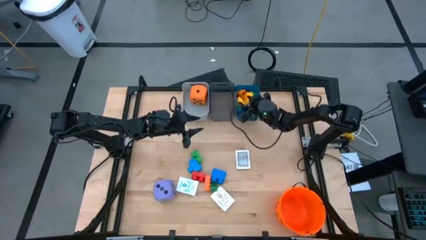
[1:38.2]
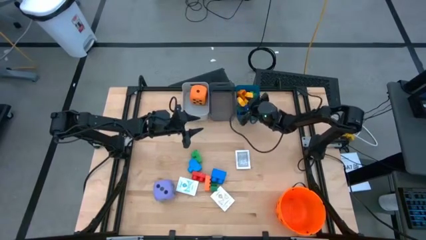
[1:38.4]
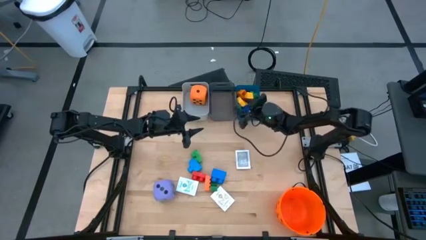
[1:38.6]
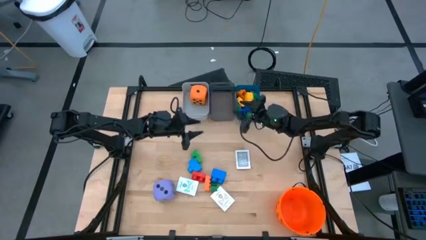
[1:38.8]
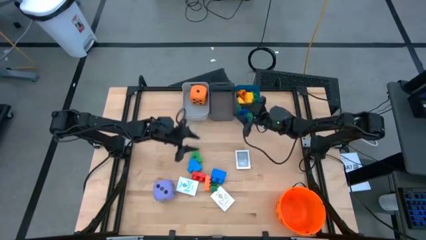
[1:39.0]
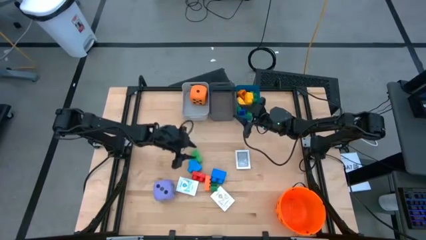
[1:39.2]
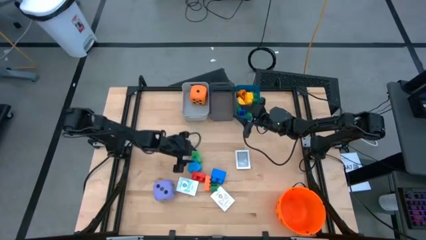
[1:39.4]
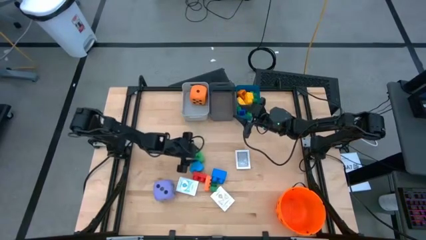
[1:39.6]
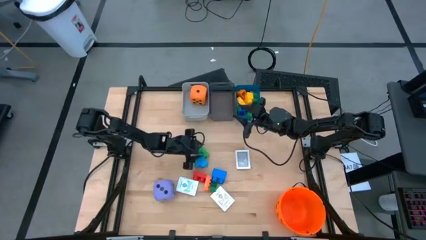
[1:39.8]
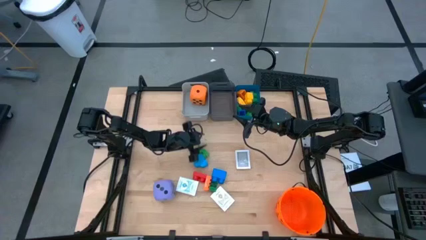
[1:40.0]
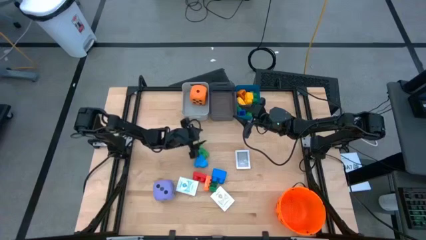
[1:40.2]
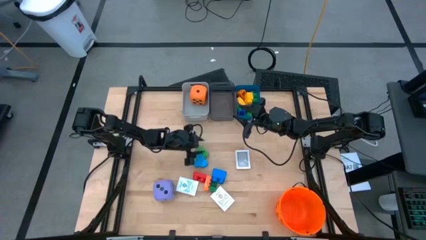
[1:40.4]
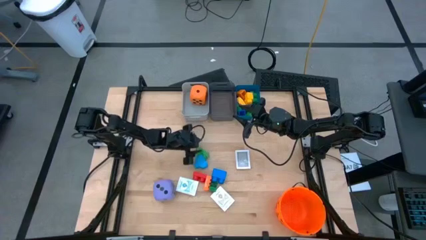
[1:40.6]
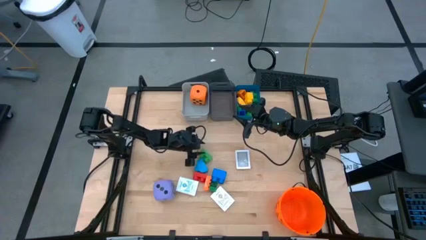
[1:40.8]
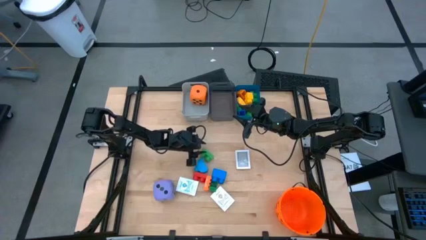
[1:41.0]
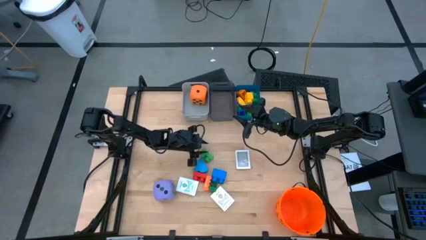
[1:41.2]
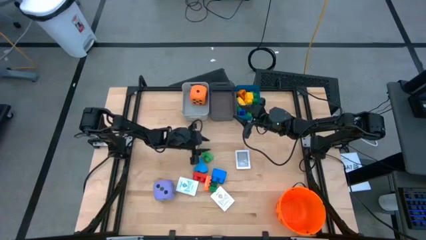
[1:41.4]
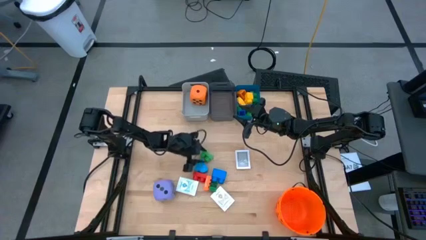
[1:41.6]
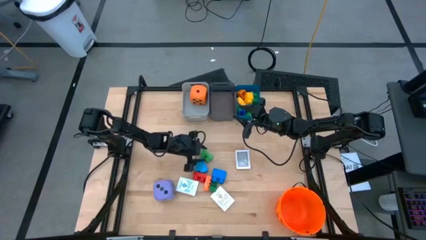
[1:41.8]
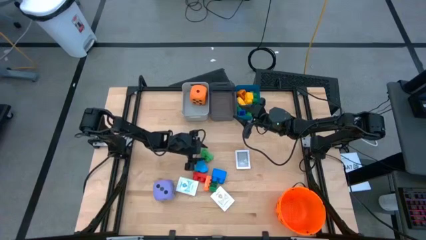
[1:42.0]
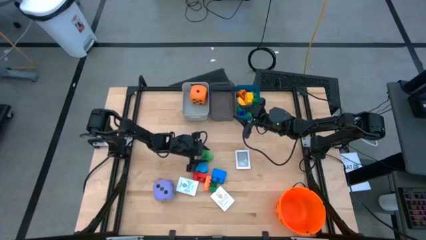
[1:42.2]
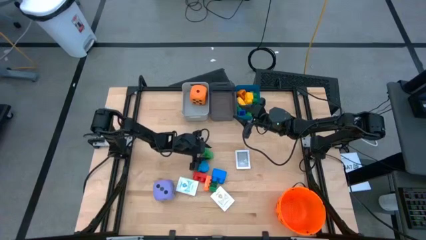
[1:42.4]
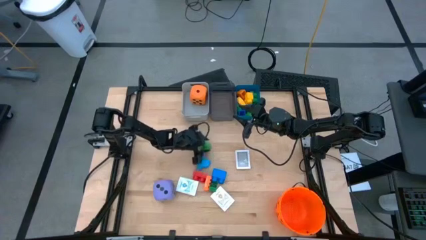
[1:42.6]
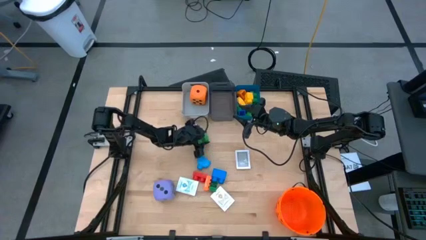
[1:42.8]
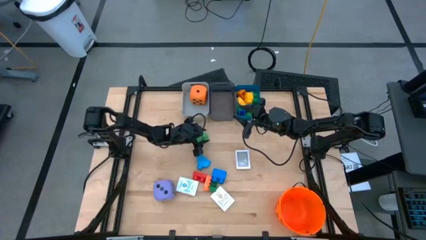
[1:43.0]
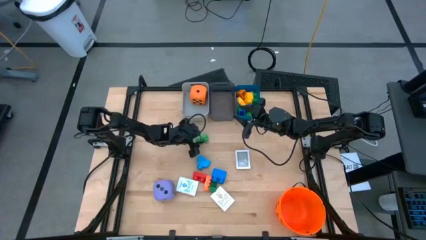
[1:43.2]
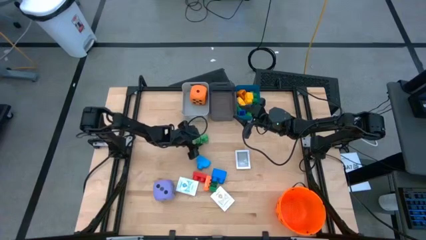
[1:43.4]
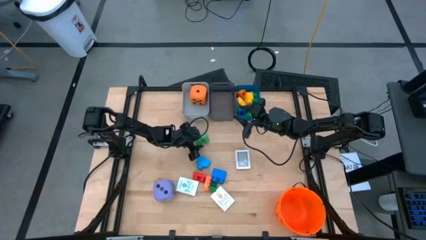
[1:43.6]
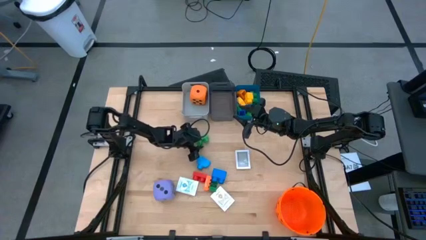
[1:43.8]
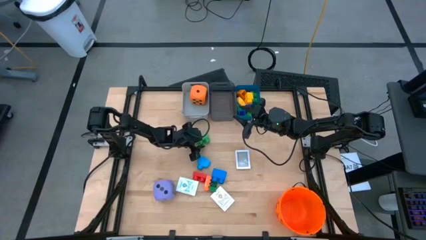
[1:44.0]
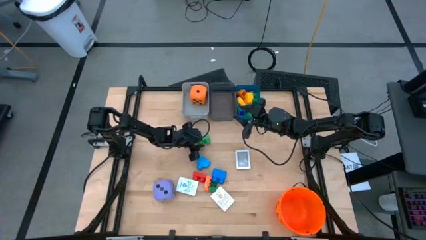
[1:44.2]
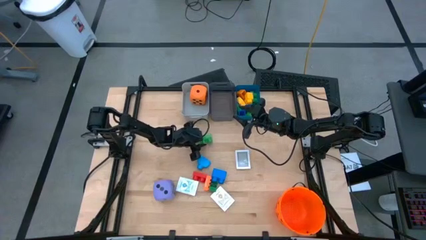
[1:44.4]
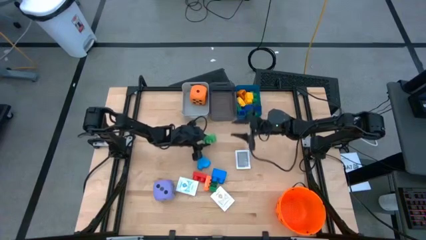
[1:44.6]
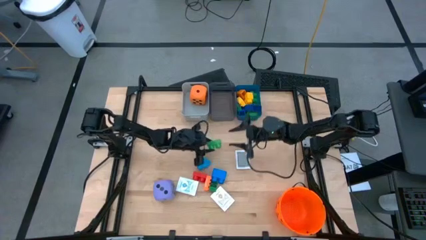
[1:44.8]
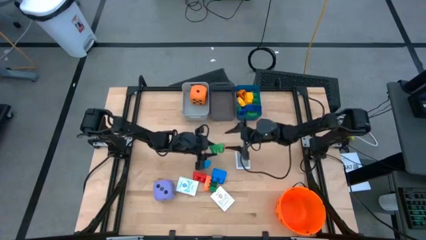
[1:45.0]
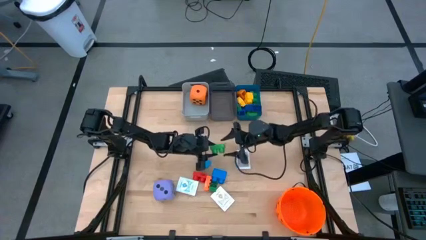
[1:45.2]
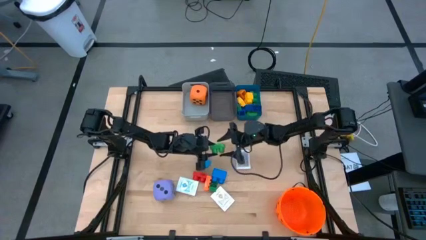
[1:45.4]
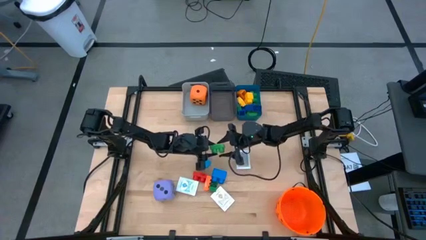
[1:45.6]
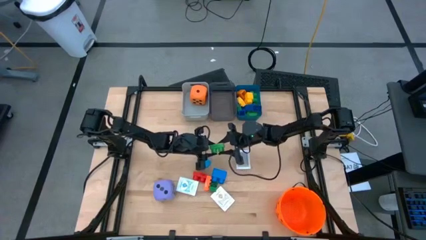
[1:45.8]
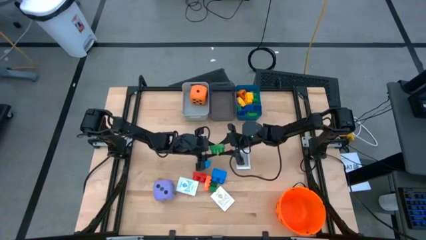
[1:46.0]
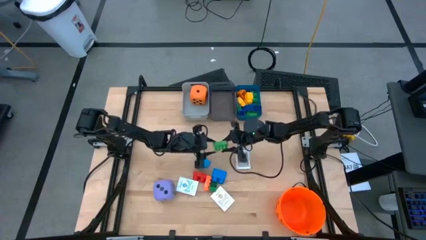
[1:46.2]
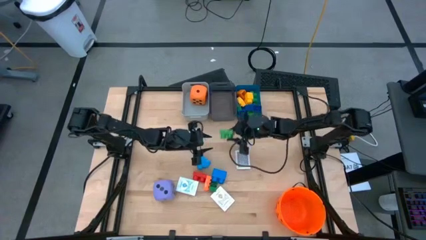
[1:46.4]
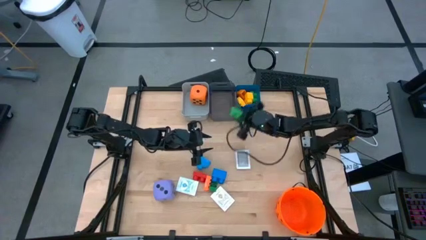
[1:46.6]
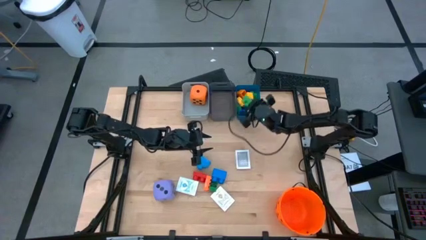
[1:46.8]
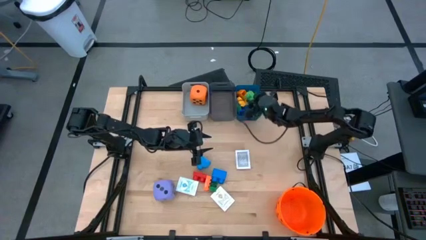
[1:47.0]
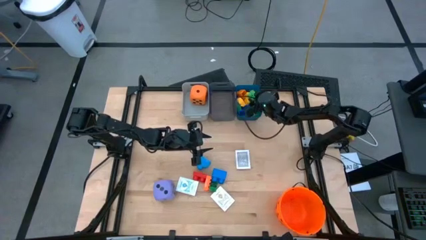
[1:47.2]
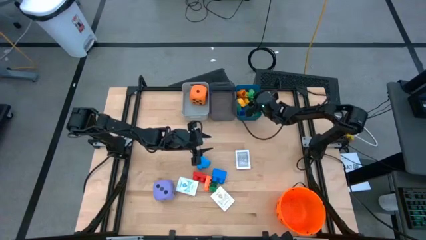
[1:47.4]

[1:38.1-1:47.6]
Task: Pick & Place Toys
Put the green game piece into the blue bin

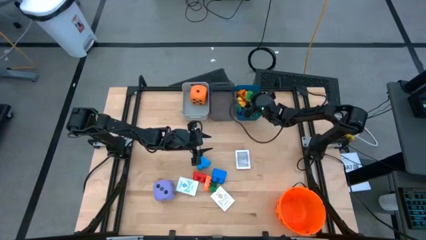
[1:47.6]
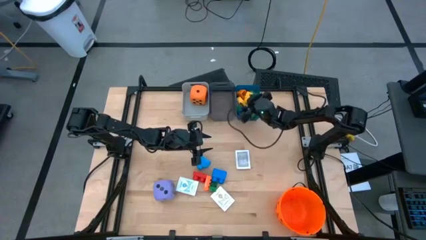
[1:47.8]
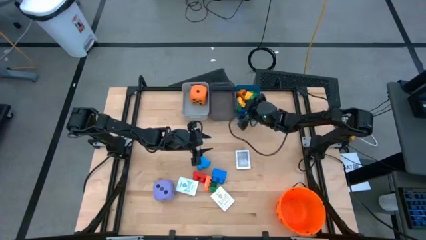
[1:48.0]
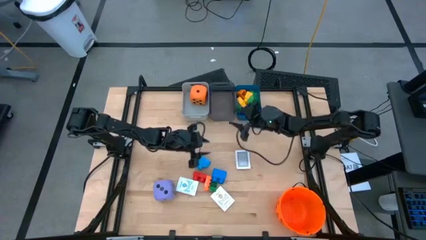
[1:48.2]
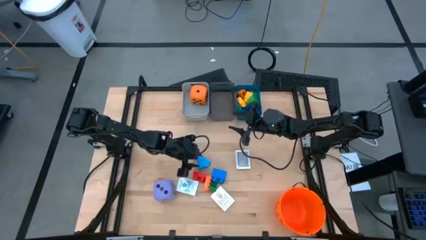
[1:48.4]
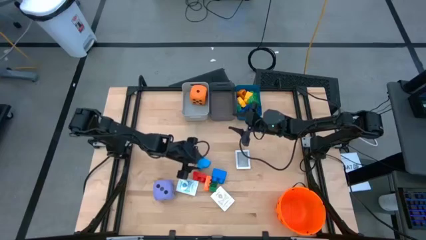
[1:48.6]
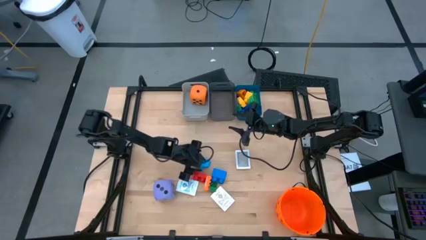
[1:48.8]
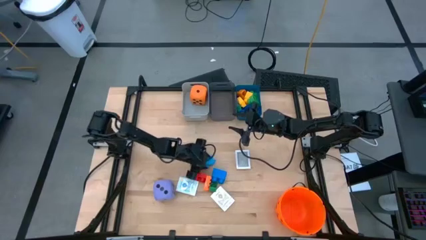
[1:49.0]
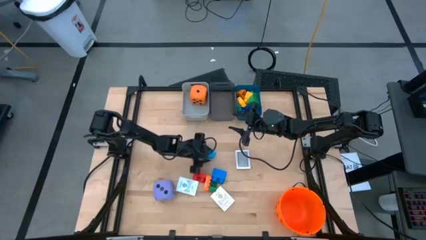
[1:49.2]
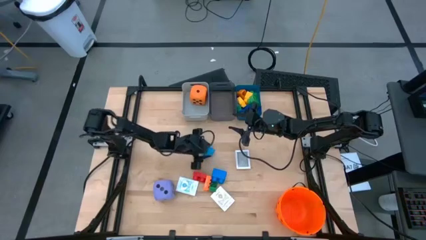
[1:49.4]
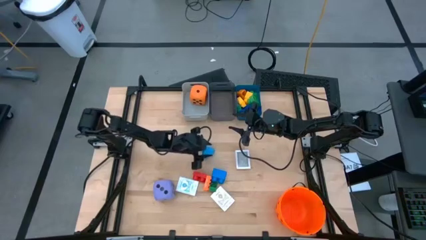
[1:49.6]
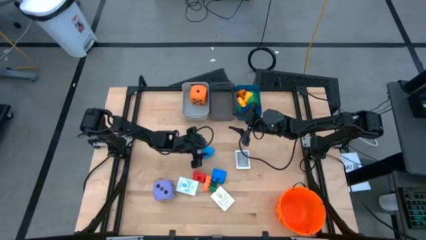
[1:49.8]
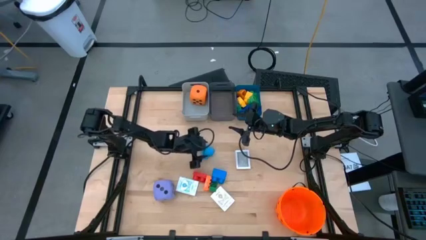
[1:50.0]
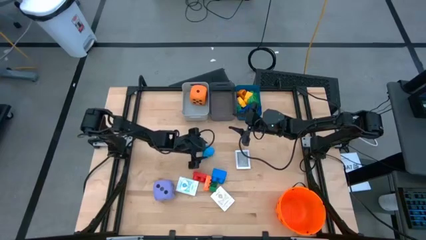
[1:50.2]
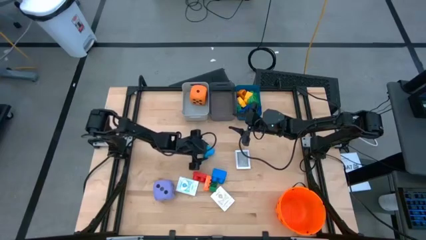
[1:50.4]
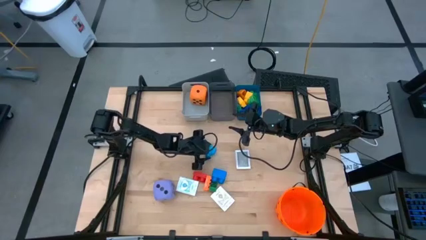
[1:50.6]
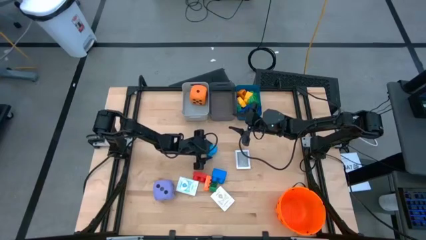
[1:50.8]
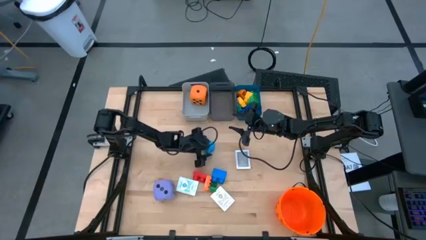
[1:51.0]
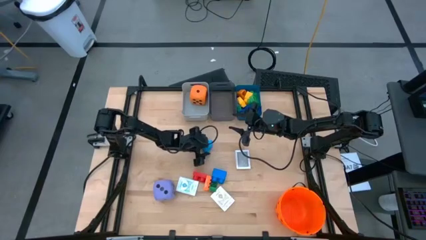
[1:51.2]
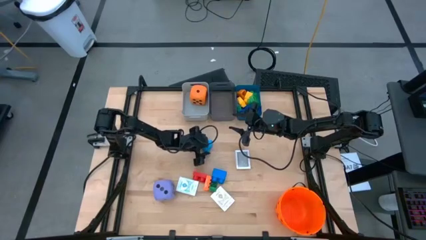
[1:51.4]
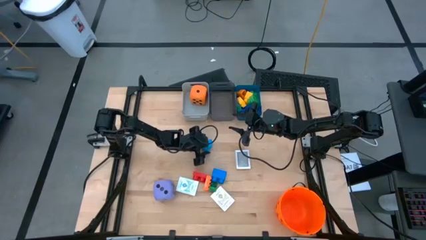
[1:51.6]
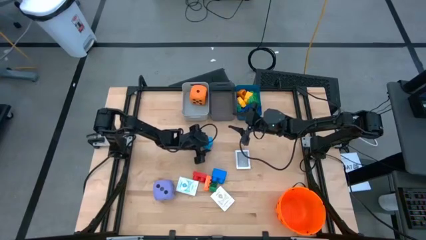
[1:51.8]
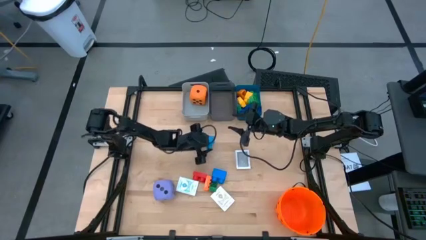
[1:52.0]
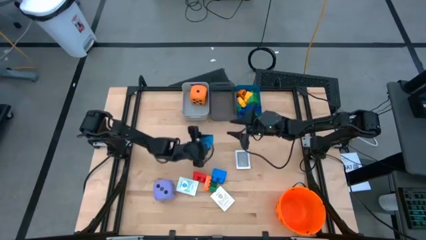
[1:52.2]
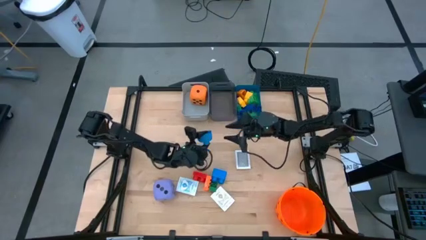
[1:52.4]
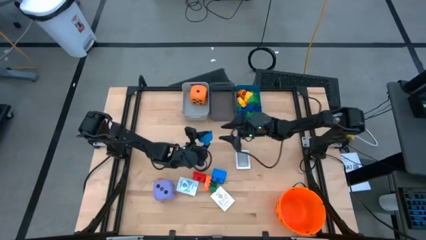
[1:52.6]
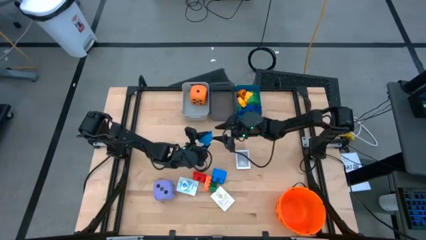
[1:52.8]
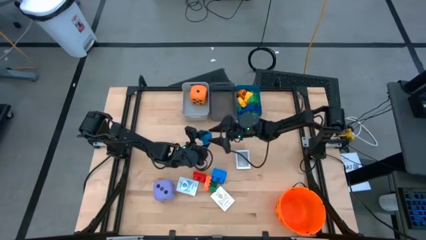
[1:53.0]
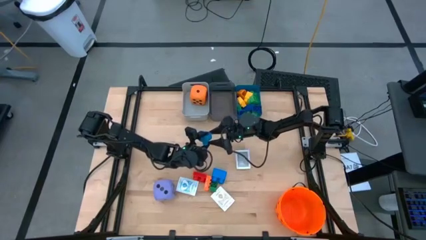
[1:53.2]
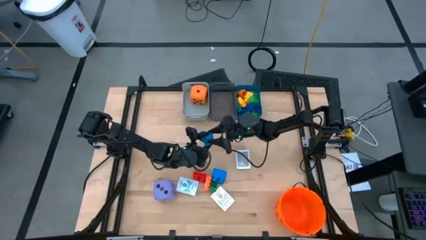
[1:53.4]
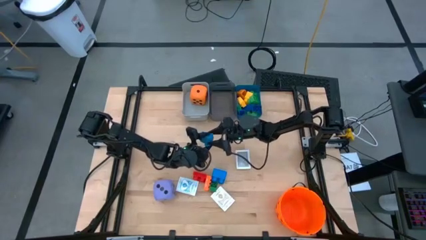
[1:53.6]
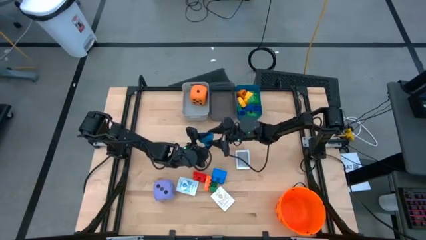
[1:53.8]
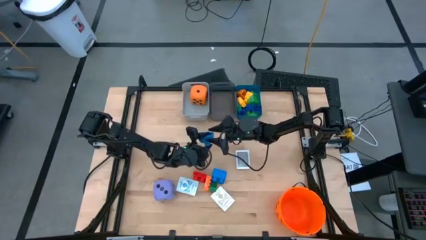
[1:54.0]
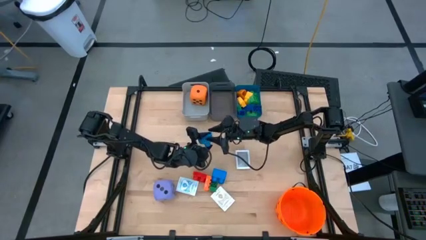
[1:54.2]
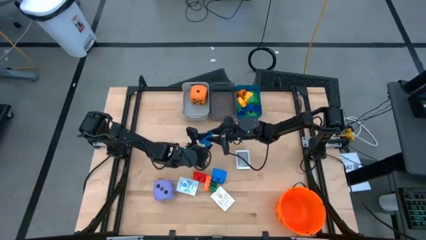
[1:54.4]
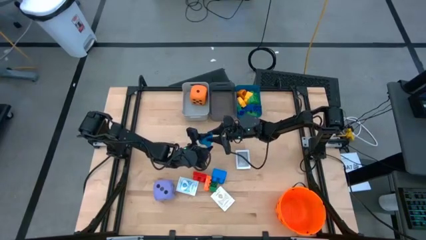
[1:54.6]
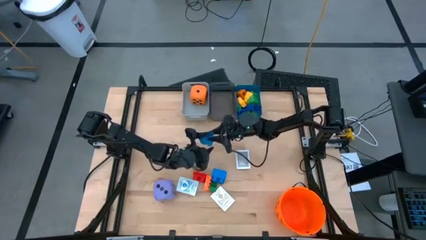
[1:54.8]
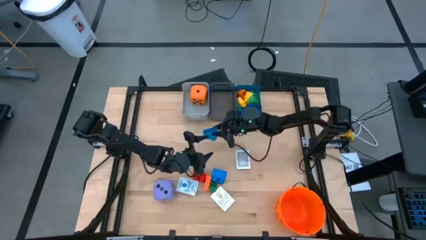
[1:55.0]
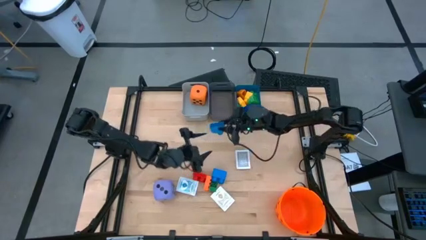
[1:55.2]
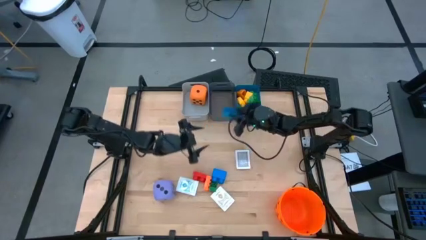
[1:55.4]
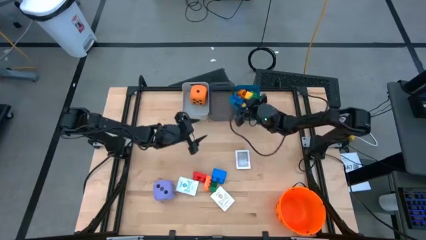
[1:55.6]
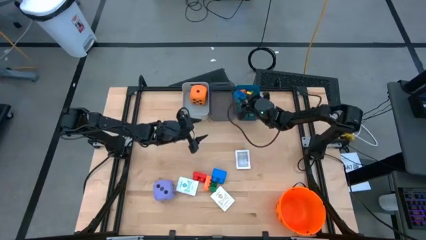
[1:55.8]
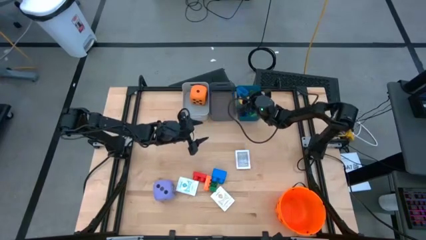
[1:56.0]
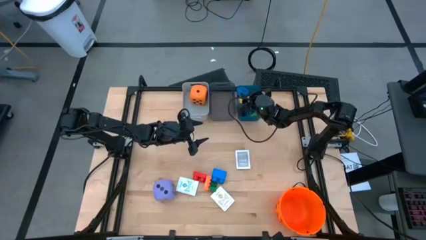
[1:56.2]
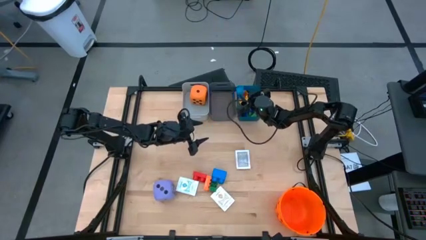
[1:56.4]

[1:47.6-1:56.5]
Put the blue game piece into the blue bin
